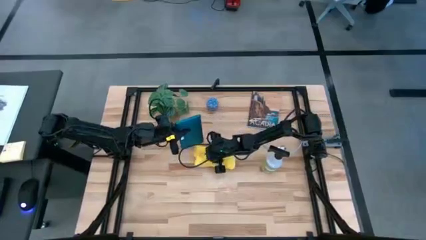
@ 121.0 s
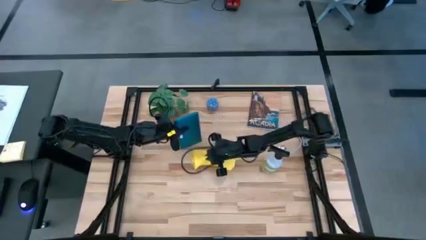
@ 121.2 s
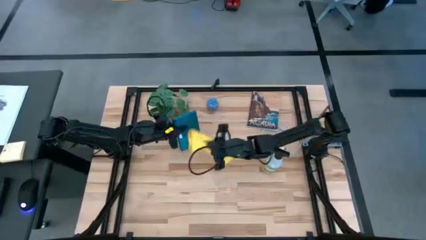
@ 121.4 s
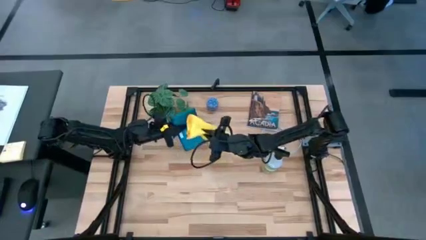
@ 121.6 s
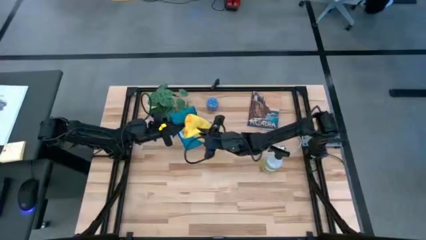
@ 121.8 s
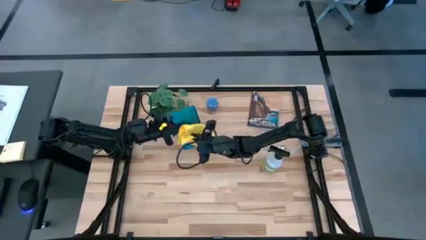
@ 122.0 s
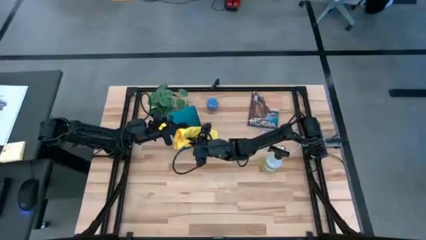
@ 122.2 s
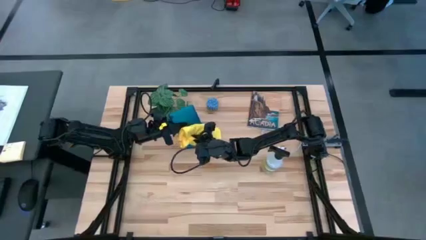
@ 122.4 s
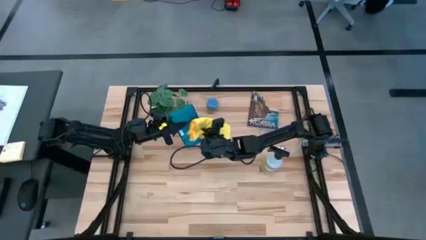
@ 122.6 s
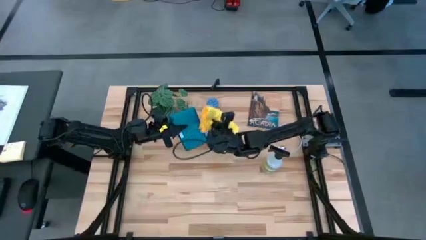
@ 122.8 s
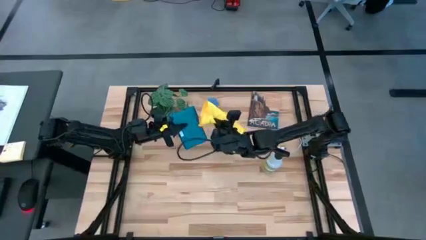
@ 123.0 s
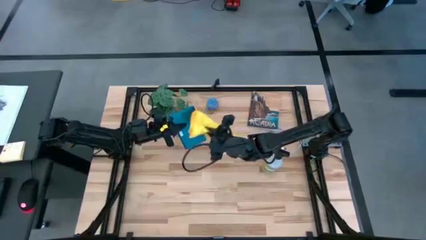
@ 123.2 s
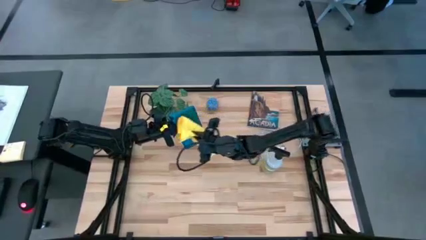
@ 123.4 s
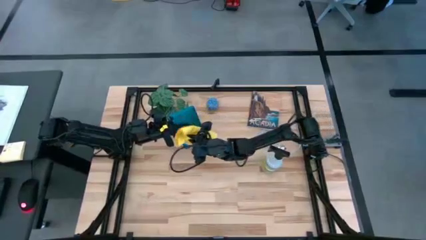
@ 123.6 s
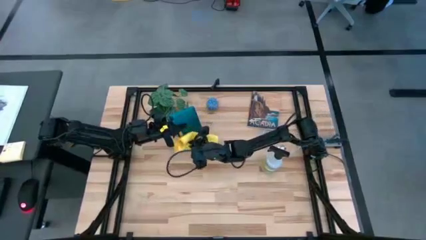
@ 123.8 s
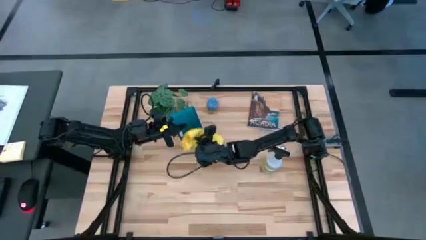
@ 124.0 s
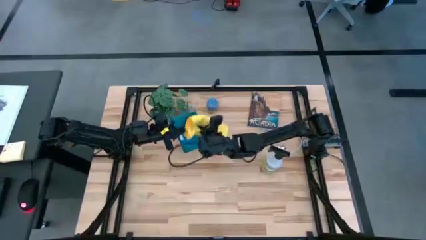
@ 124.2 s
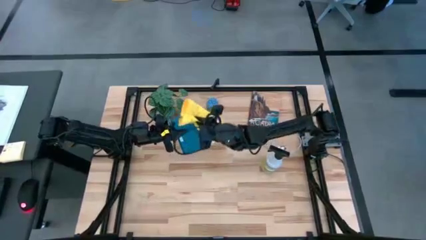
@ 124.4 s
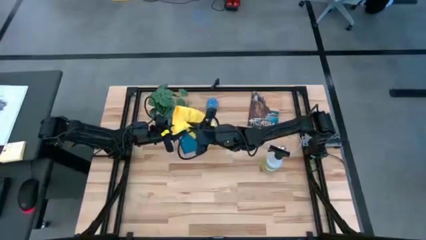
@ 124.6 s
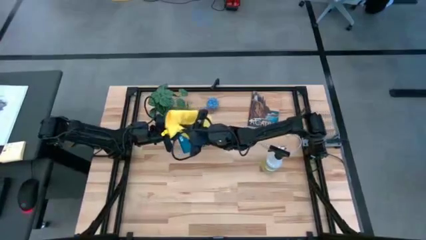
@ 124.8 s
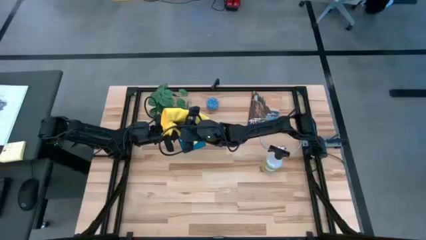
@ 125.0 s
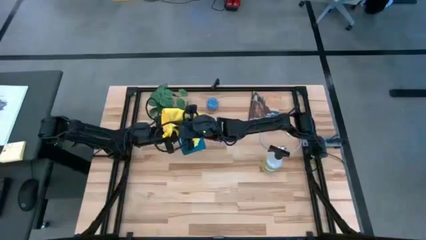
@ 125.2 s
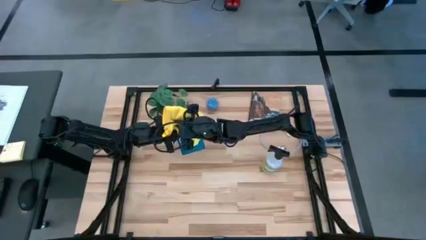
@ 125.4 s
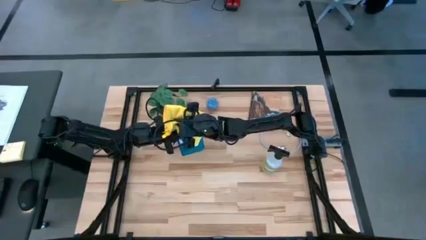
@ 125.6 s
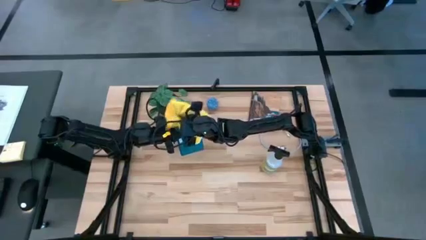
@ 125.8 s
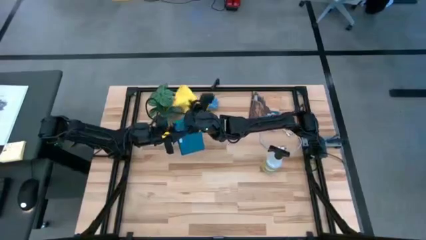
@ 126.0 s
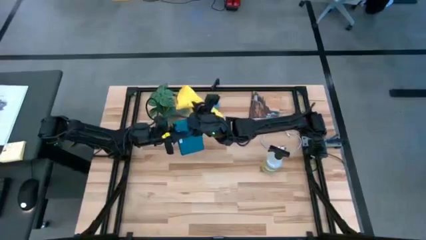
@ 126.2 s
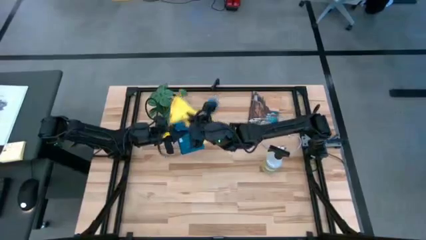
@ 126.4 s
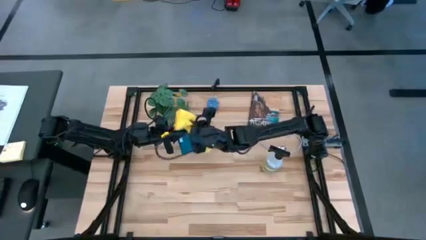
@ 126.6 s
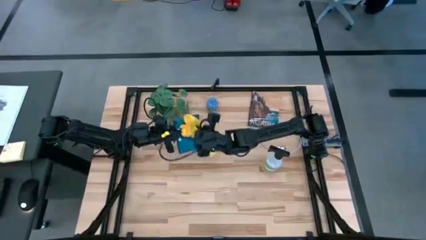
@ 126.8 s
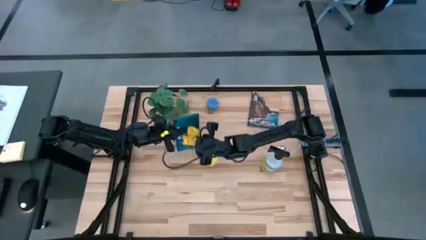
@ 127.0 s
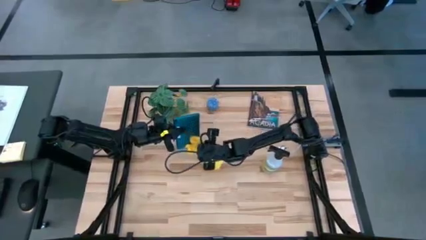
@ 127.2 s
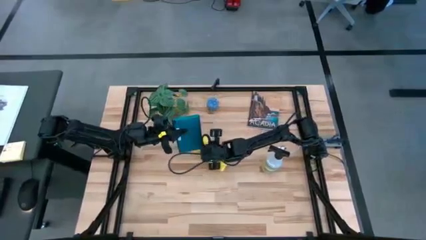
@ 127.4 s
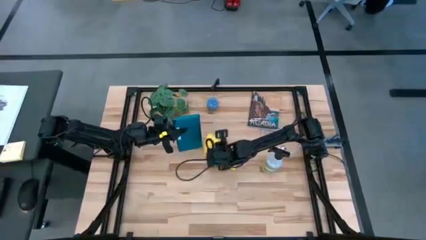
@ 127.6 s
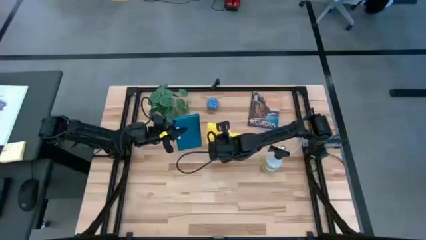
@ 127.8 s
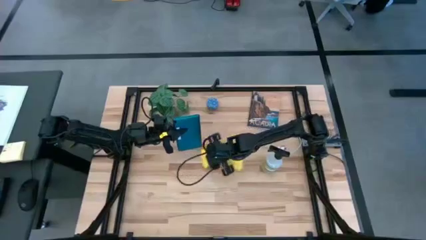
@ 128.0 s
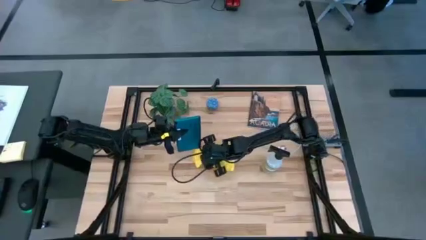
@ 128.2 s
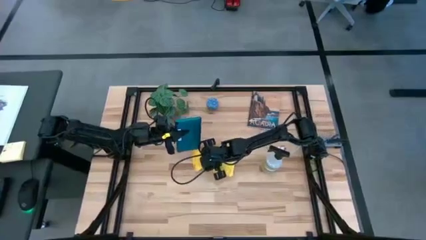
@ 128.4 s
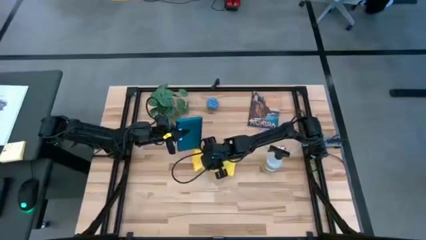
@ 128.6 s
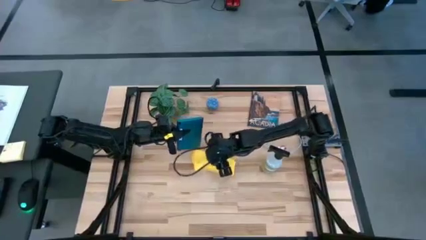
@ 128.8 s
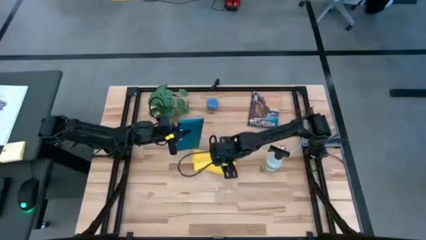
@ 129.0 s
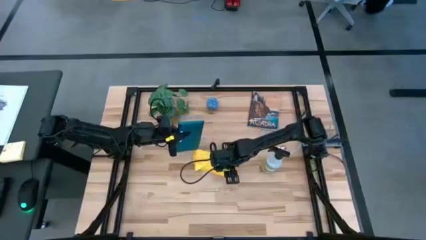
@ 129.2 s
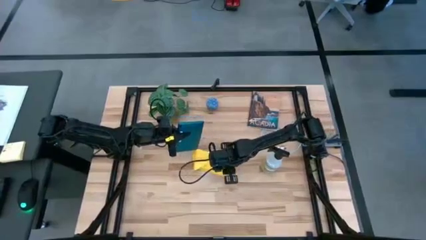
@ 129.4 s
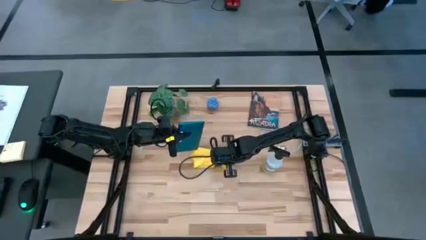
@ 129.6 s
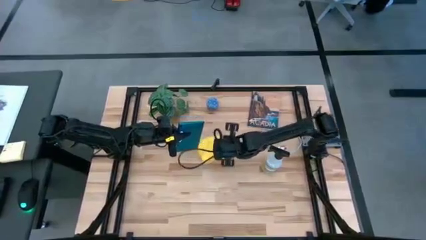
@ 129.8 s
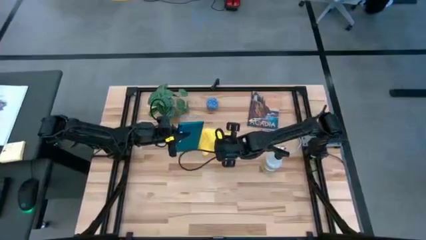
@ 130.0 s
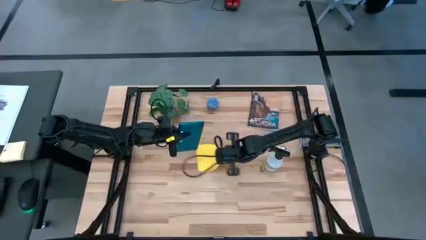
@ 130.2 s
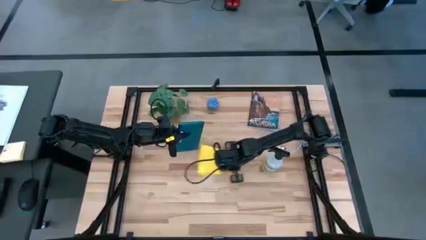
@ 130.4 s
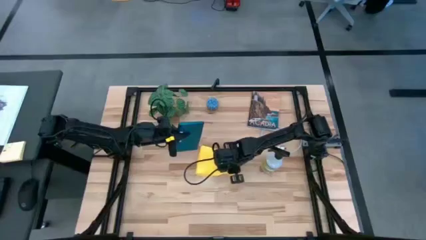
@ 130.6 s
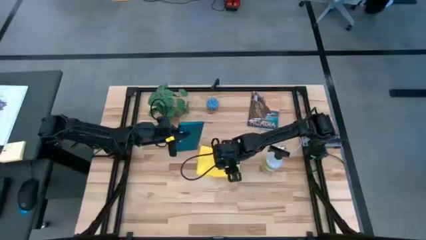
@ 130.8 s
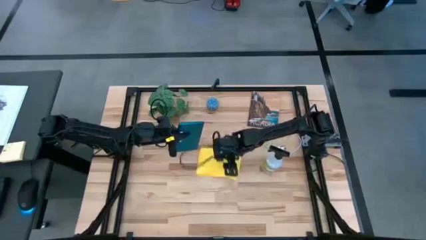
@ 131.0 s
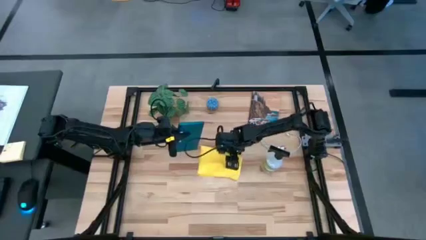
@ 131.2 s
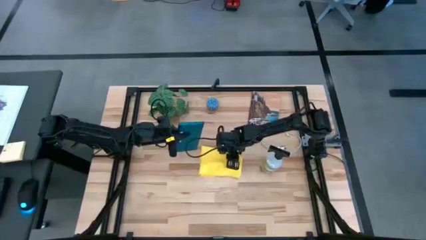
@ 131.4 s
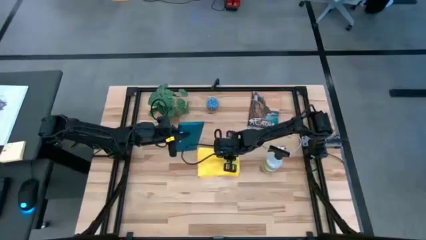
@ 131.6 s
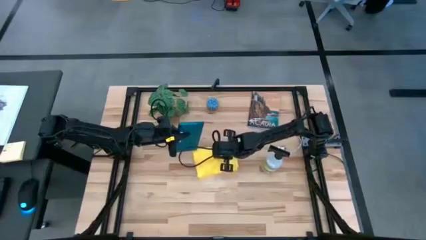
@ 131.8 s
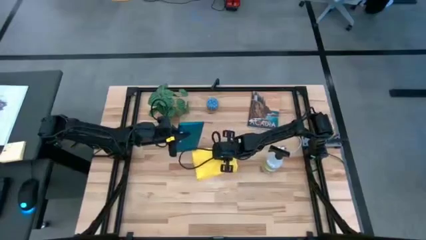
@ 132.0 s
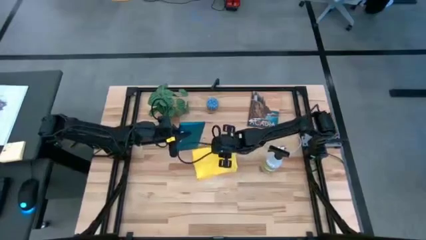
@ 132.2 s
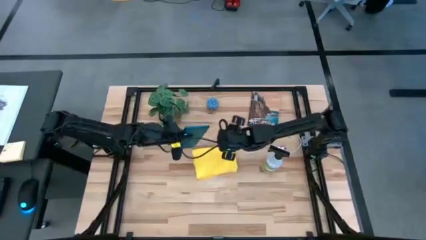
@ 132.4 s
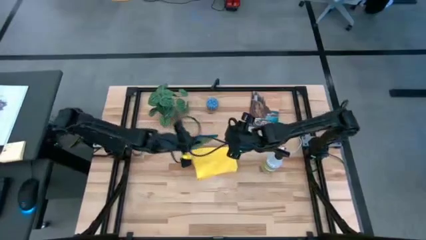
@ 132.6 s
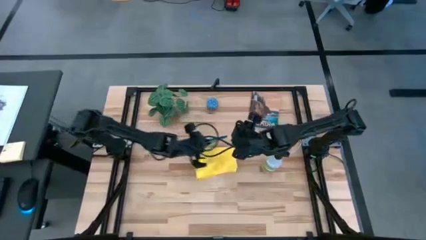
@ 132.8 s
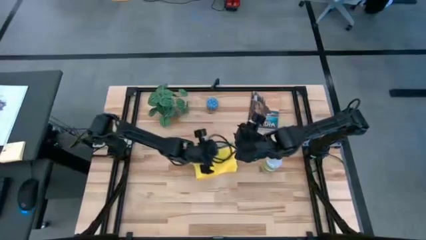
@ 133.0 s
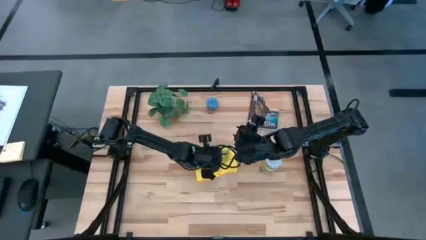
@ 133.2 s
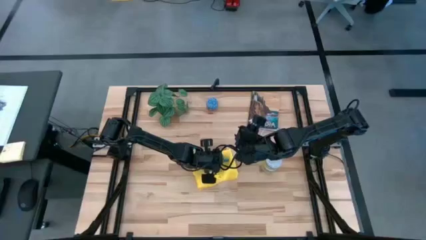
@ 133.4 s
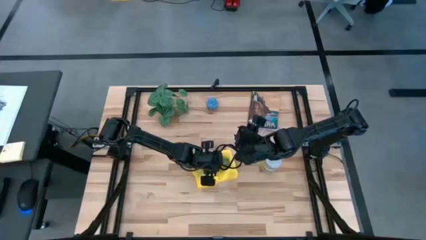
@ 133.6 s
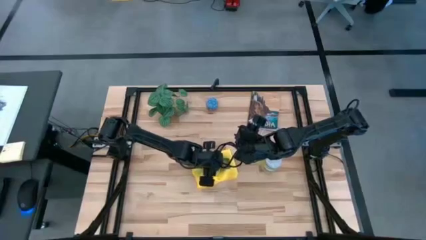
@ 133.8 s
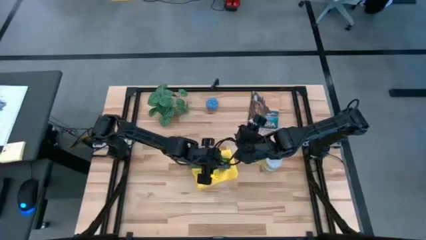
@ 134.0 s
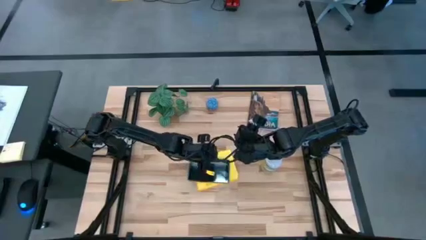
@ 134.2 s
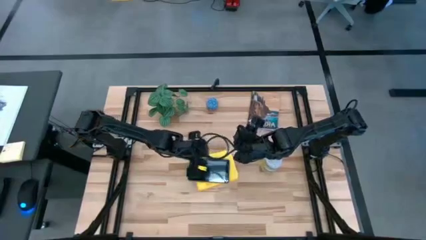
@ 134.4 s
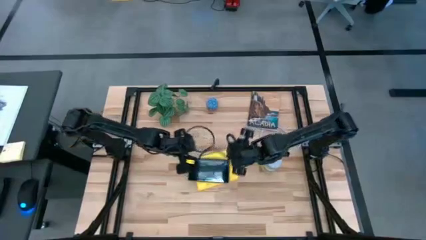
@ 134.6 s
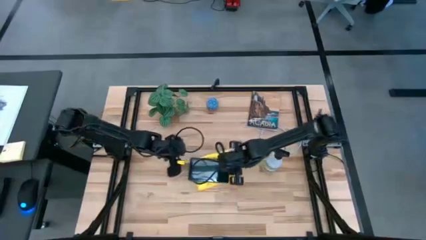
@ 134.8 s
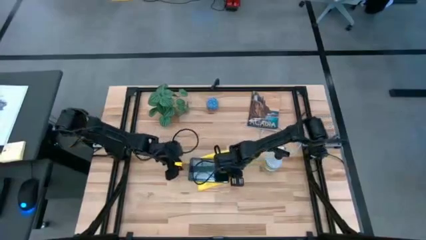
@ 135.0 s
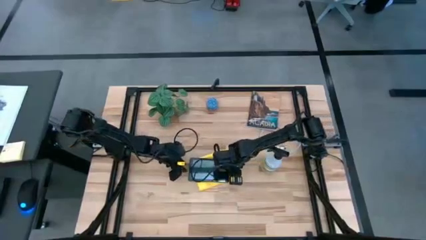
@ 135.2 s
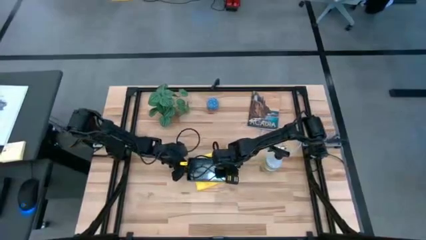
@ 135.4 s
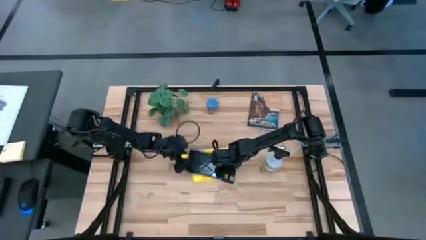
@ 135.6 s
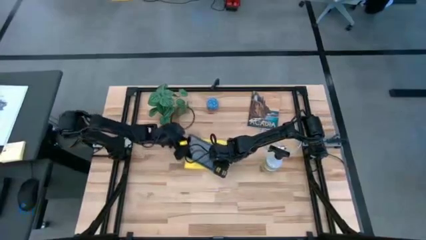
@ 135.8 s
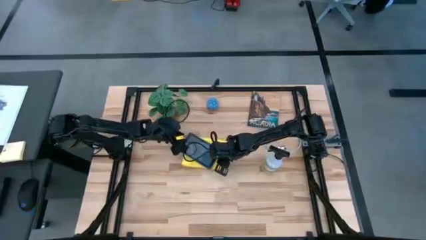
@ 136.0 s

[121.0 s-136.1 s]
Task: Apply microfiber cloth
Wipe the back of the blue tablet using the yellow microfiber cloth
